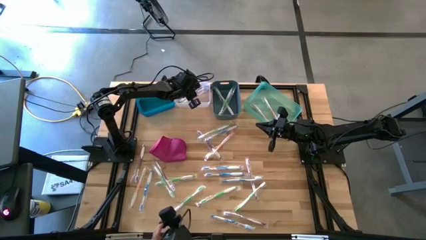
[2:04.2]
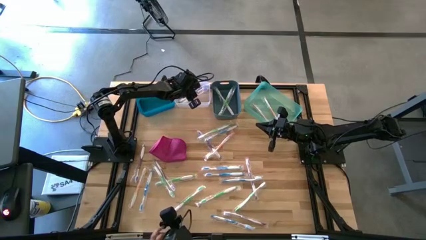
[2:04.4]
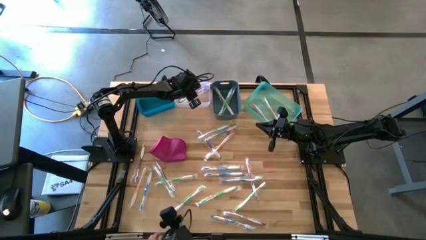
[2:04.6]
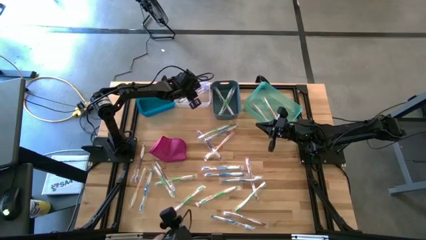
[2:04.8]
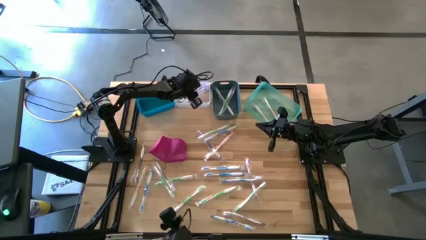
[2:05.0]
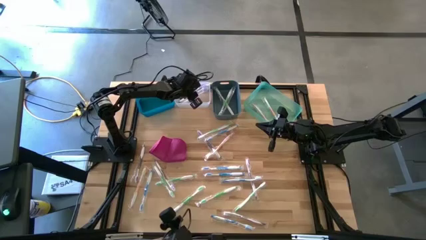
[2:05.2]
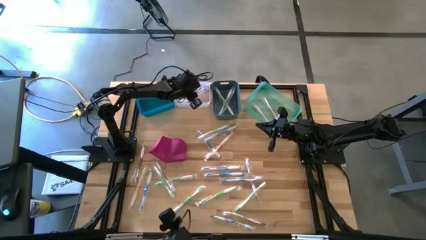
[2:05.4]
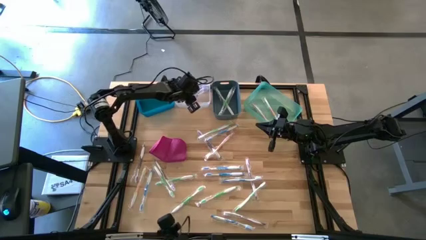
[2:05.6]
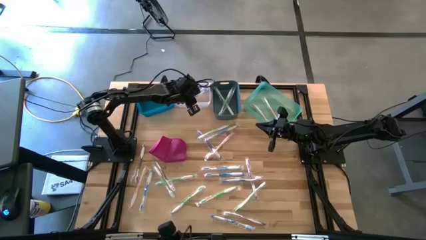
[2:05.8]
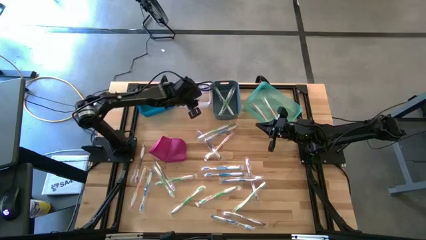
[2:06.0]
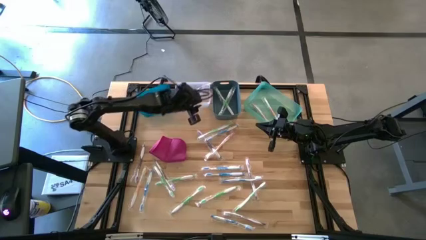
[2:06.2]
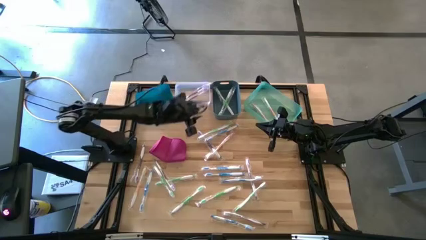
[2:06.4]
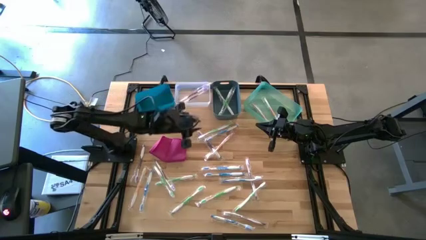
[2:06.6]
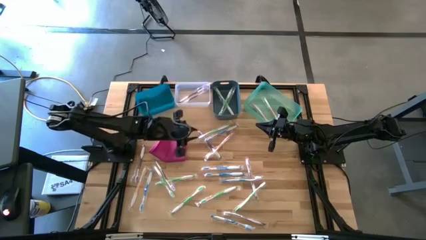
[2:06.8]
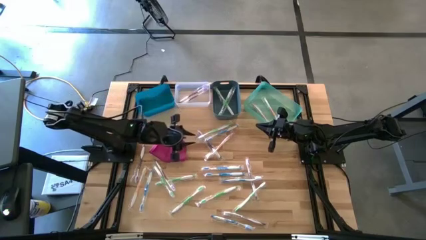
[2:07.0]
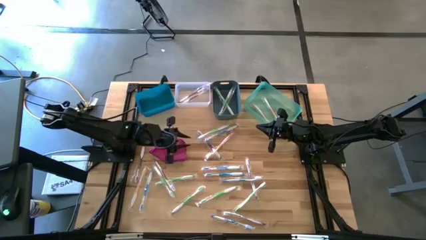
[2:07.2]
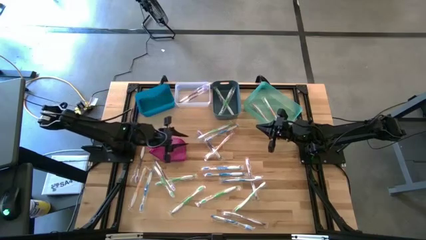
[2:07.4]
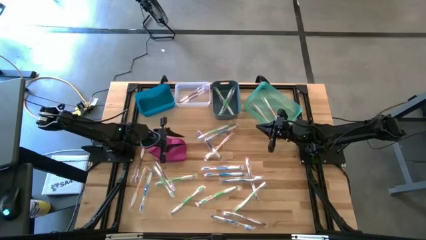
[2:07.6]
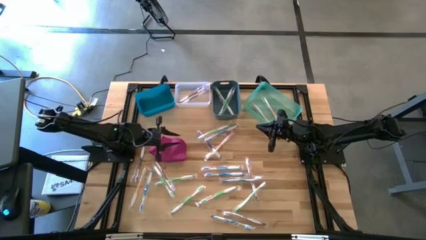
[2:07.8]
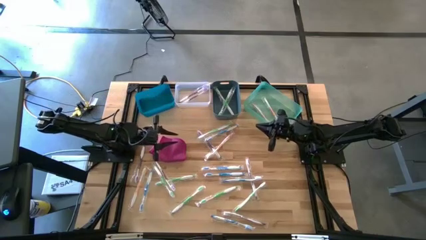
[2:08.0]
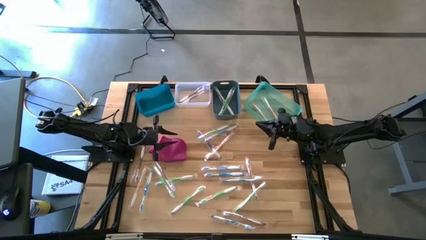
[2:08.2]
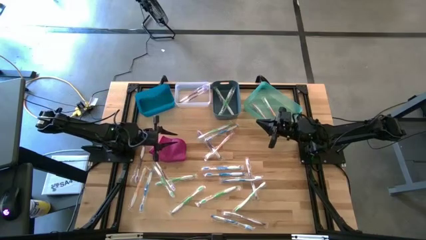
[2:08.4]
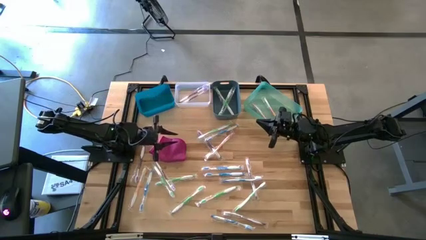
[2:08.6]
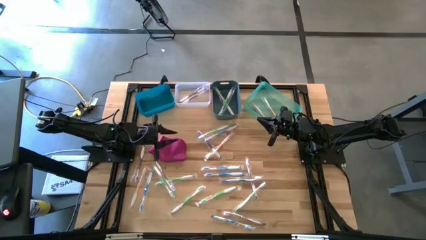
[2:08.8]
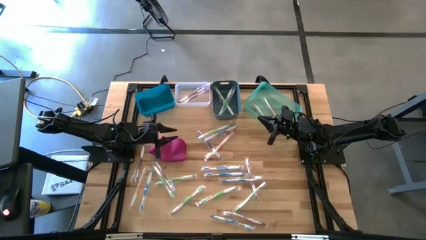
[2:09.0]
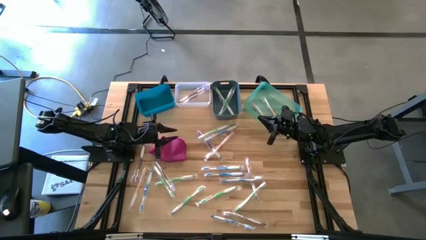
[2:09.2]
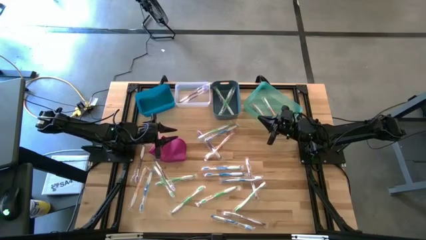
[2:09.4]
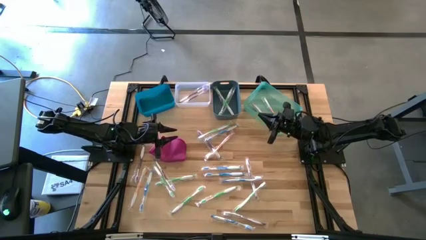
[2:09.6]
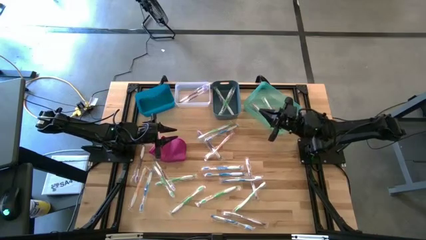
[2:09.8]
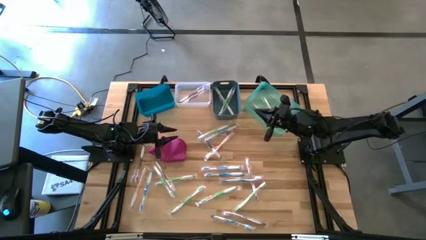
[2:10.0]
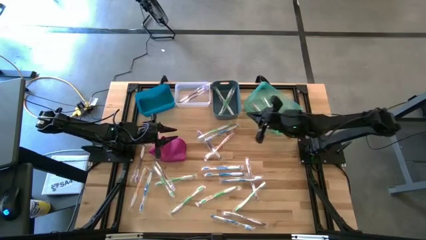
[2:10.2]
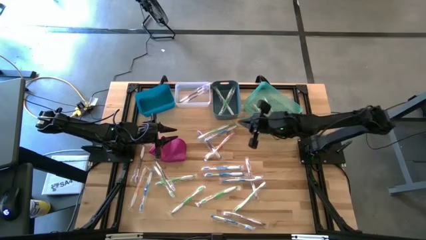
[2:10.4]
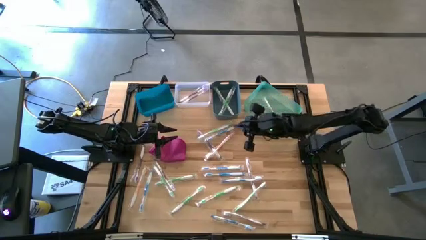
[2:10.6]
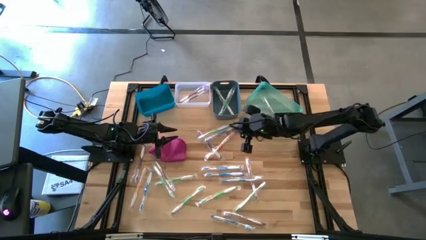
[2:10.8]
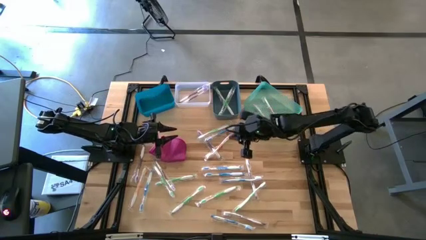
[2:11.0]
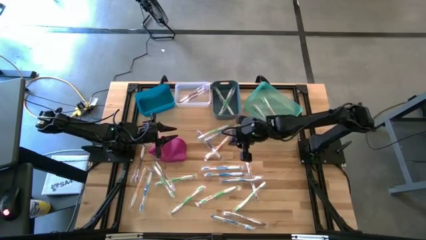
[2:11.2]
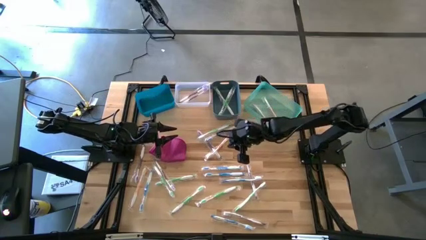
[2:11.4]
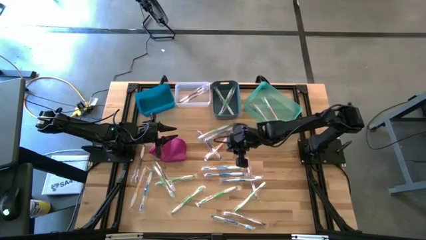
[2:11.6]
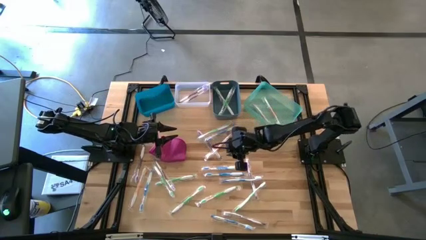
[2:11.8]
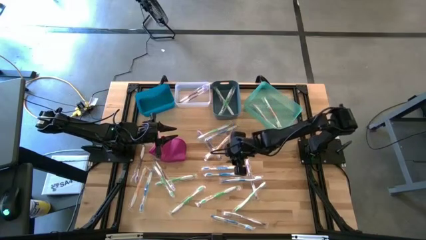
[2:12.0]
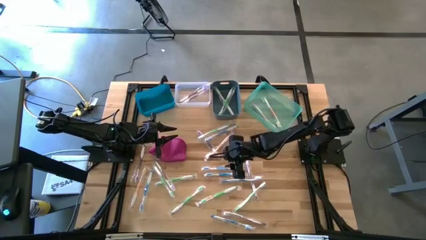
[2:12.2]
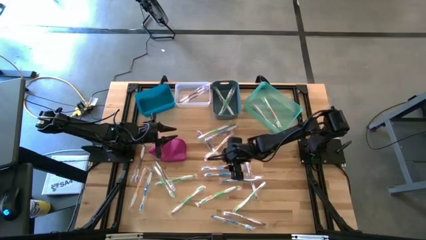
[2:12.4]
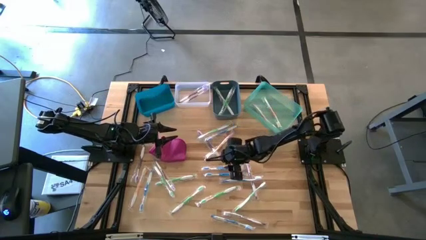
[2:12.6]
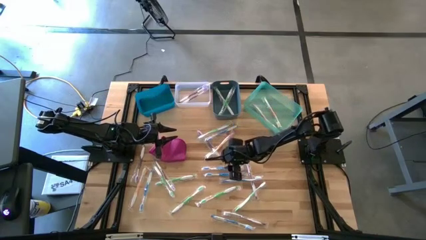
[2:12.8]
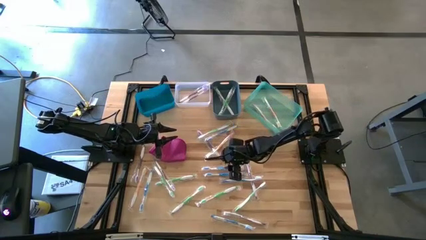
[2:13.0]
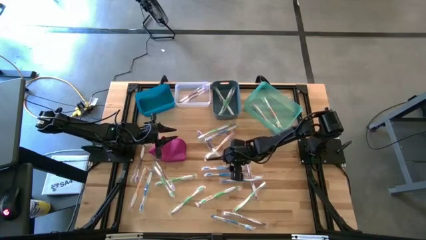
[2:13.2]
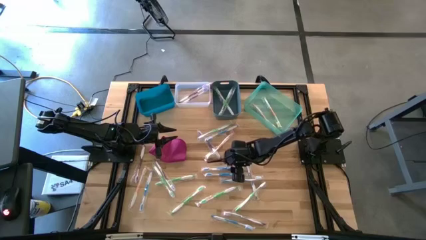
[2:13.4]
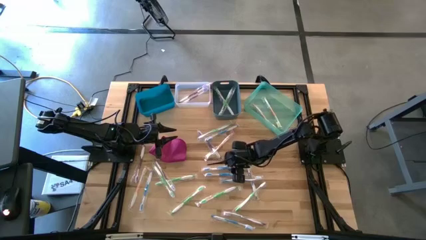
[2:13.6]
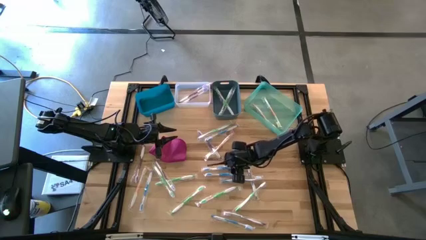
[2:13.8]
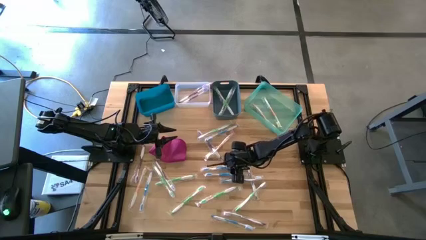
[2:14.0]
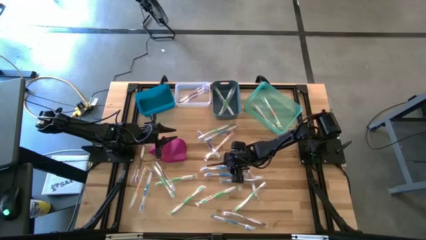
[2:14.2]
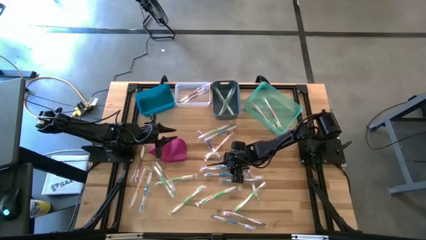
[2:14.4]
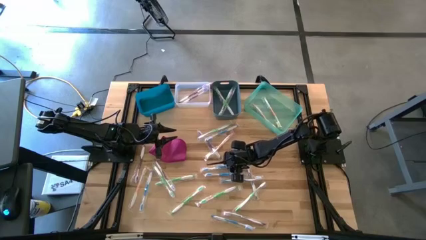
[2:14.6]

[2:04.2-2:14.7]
Task: Pick & Place Toothbrushes
Put the blue toothbrush into the blue bin

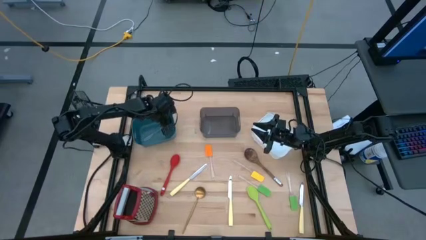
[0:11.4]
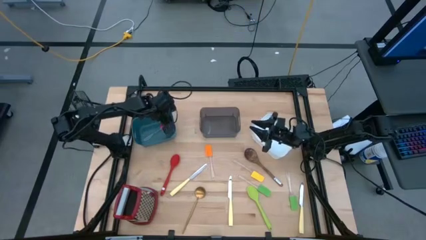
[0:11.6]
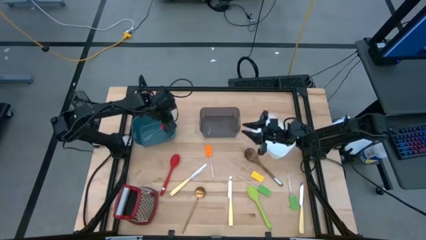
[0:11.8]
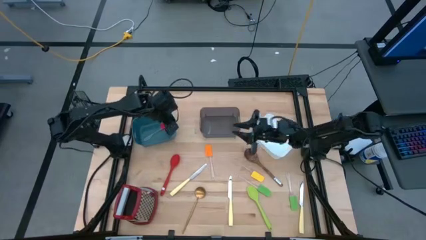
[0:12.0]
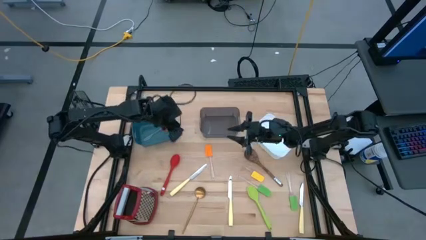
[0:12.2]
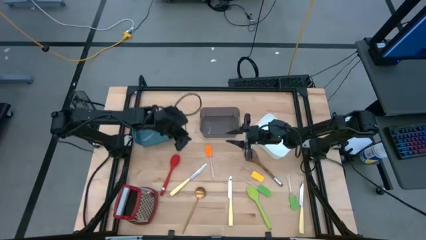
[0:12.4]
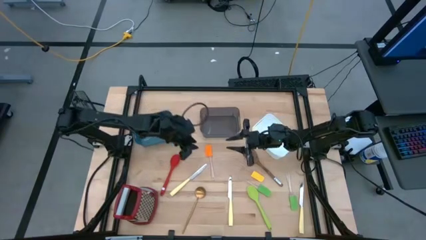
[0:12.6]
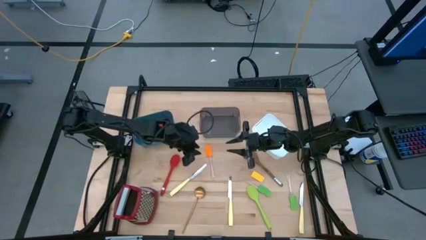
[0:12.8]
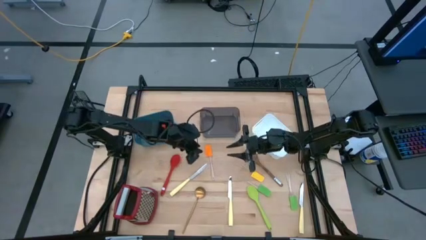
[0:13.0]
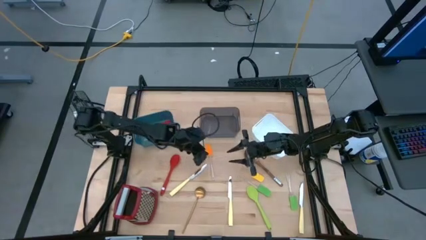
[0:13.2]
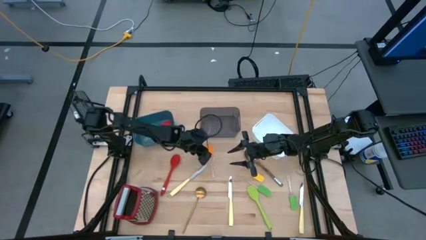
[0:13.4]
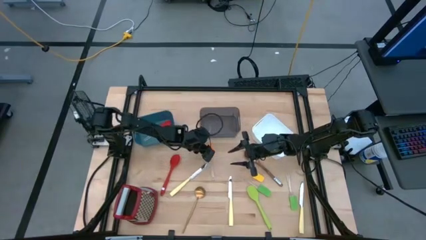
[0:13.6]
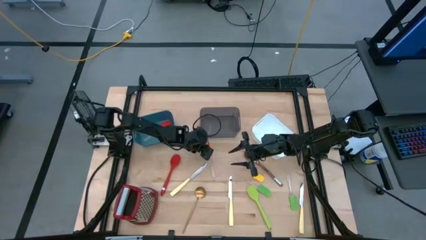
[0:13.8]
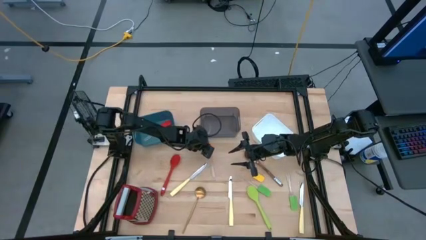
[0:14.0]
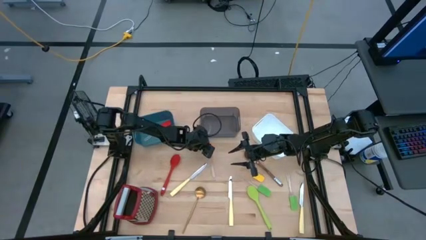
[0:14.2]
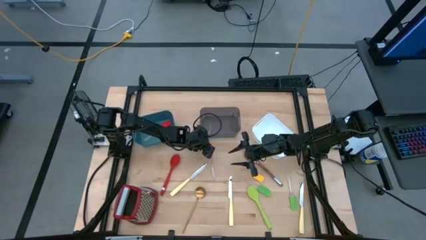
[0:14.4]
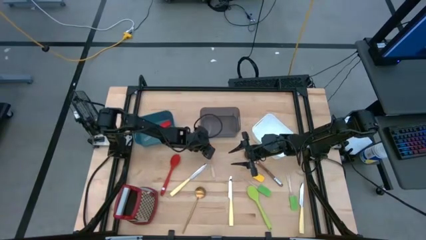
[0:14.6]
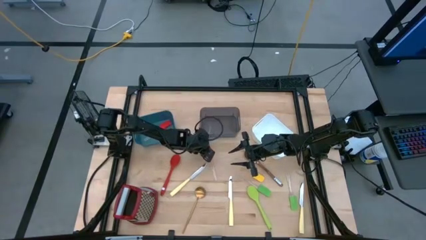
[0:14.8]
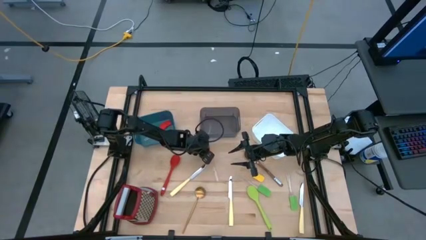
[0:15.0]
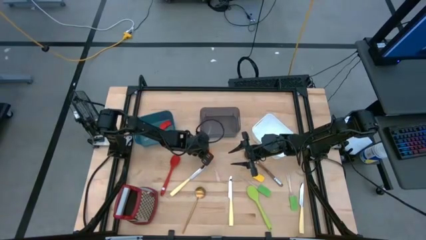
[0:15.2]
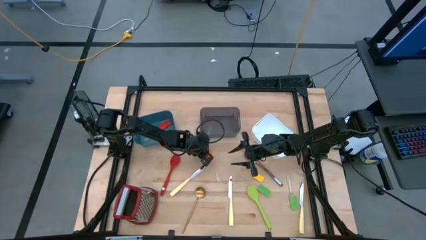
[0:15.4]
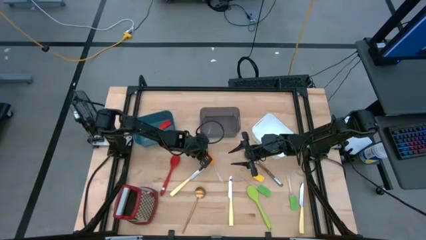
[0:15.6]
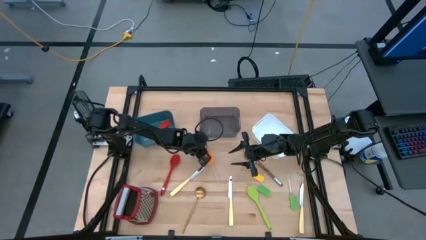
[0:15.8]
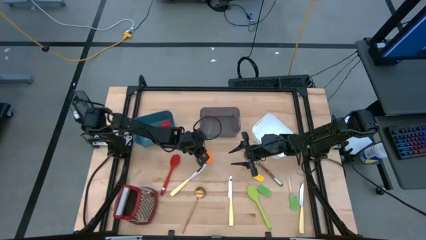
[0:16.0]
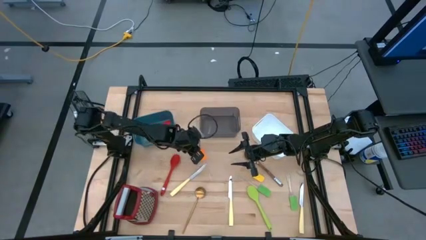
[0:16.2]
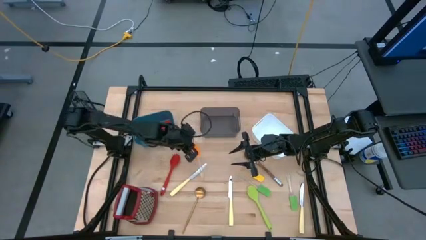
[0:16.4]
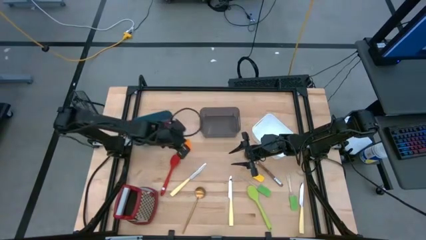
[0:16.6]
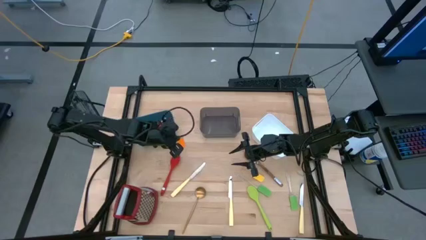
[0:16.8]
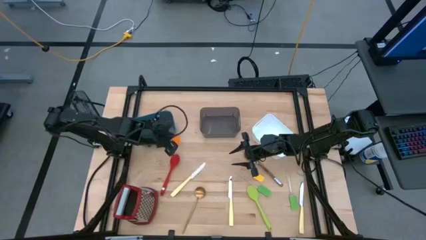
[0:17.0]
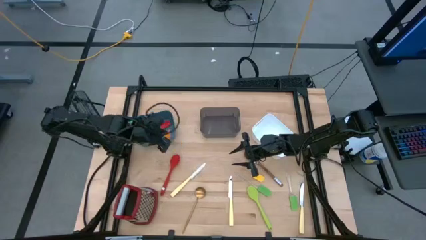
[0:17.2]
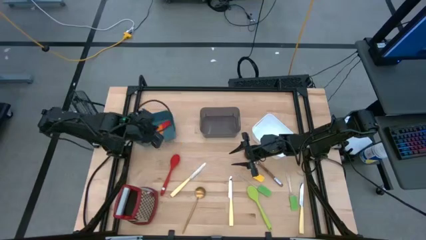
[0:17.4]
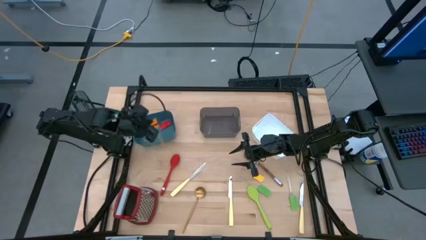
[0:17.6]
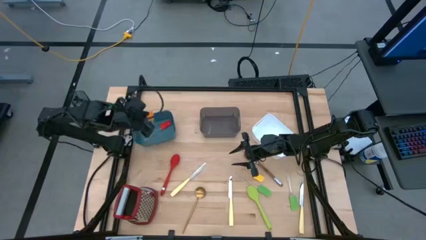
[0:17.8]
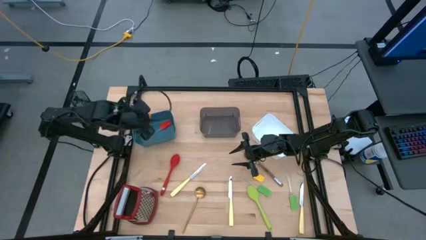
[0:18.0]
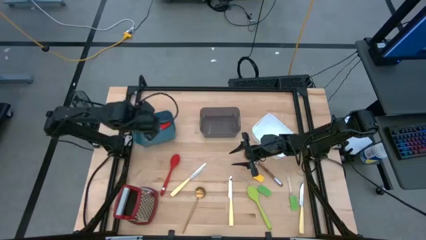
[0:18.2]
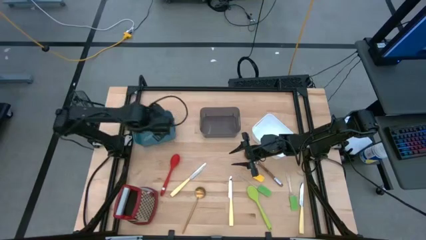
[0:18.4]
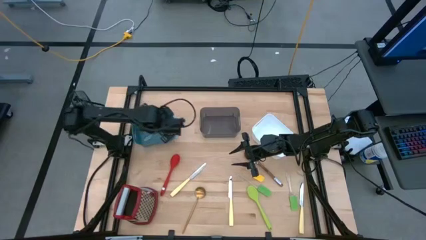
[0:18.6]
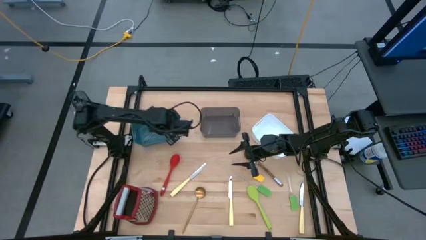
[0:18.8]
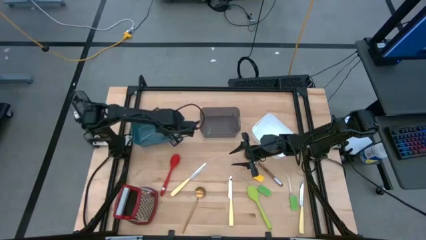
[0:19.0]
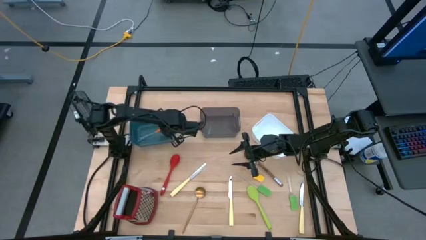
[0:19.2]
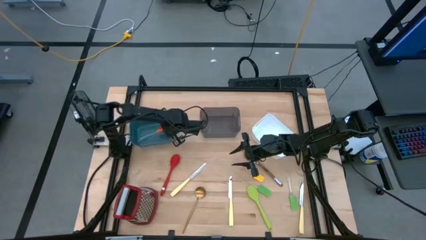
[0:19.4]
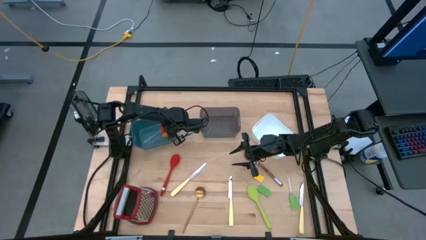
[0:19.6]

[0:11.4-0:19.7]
Task: Pick & Place Kitchen Items
Put the orange spatula into the blue bin
